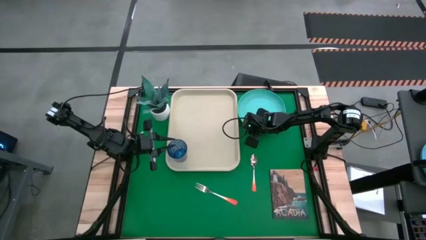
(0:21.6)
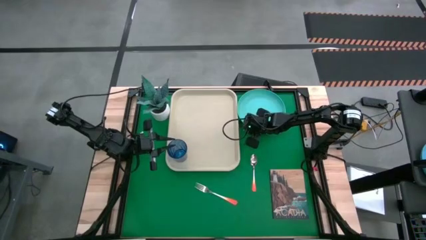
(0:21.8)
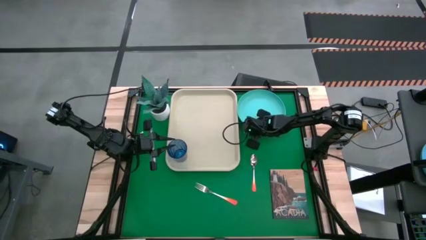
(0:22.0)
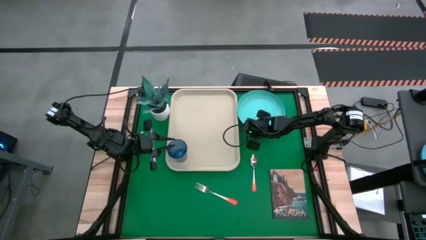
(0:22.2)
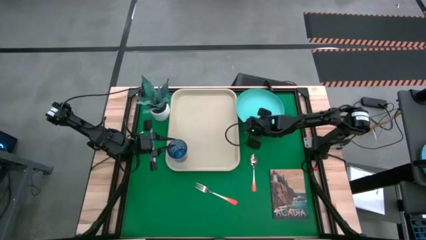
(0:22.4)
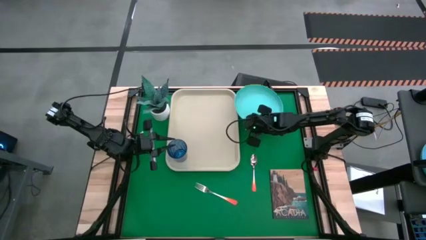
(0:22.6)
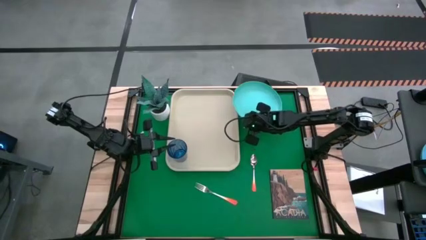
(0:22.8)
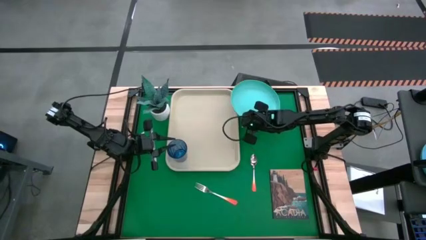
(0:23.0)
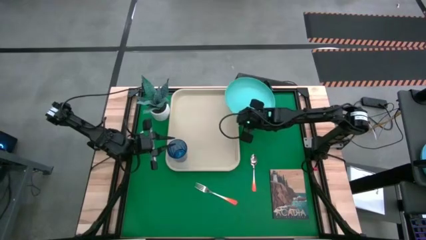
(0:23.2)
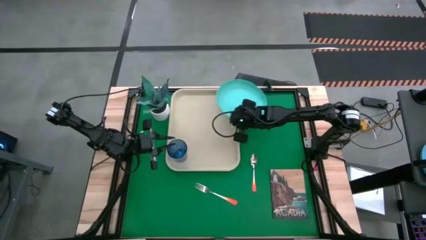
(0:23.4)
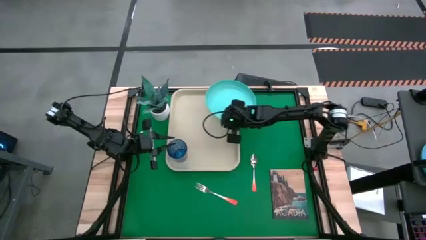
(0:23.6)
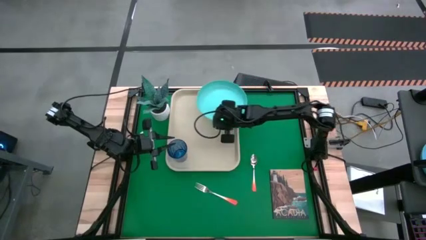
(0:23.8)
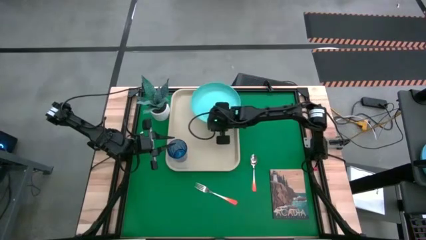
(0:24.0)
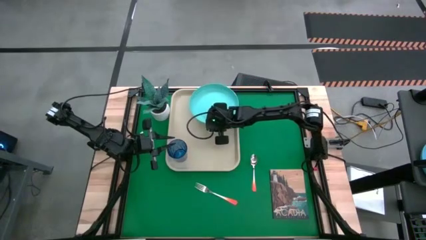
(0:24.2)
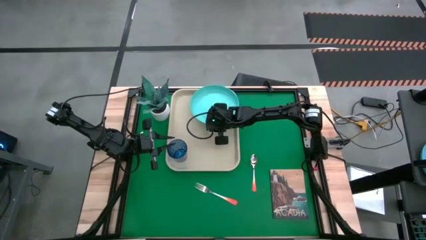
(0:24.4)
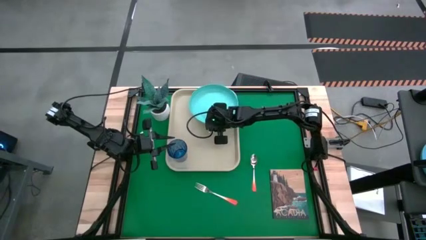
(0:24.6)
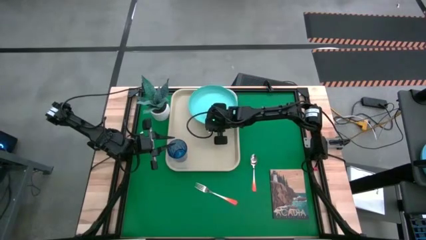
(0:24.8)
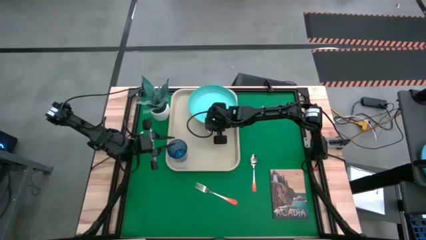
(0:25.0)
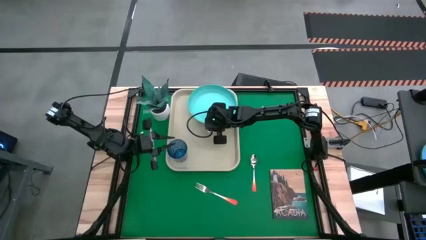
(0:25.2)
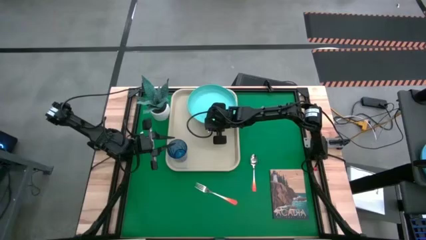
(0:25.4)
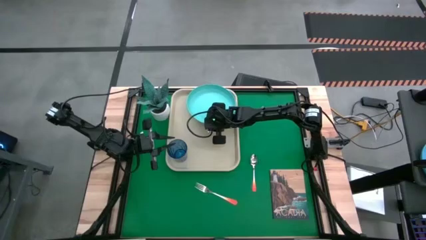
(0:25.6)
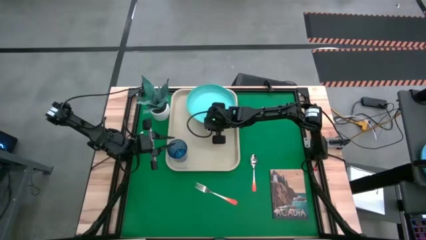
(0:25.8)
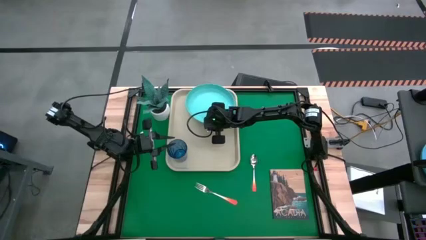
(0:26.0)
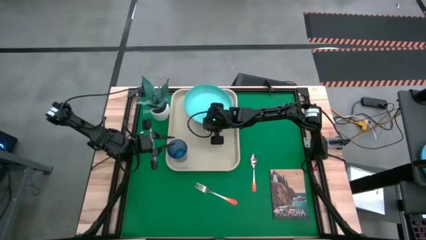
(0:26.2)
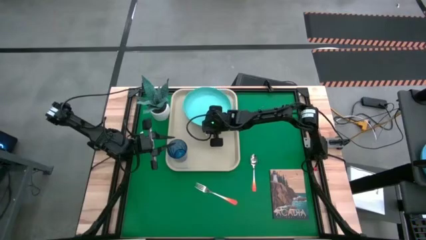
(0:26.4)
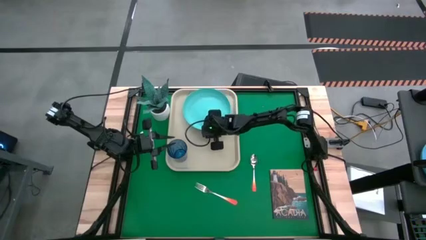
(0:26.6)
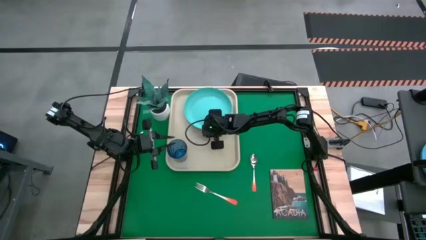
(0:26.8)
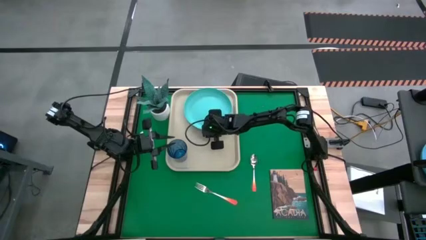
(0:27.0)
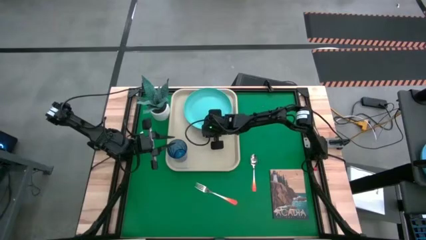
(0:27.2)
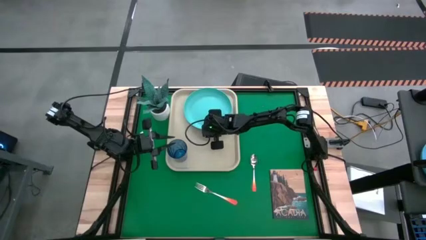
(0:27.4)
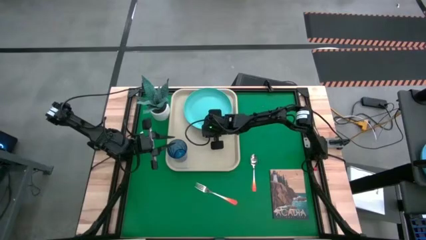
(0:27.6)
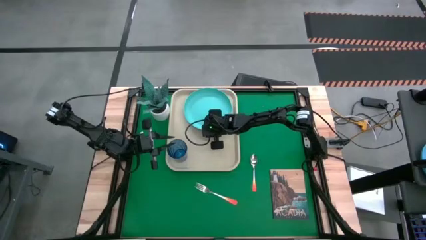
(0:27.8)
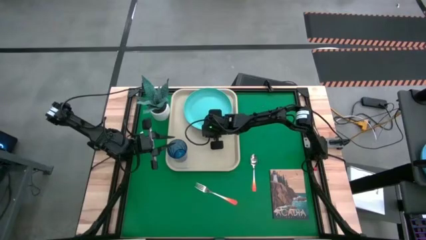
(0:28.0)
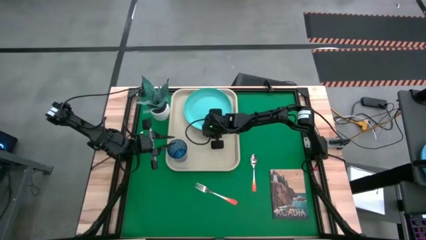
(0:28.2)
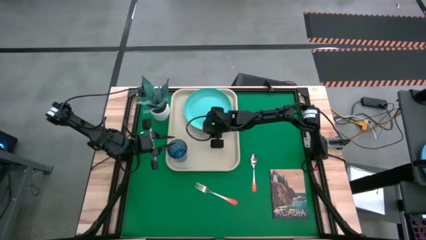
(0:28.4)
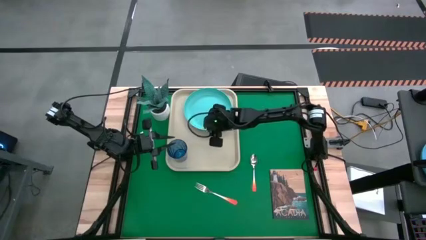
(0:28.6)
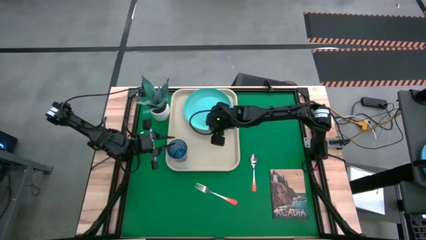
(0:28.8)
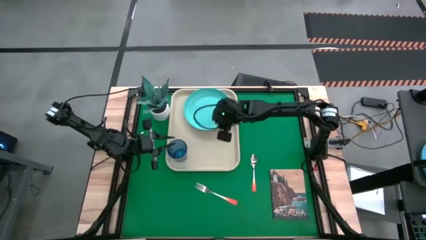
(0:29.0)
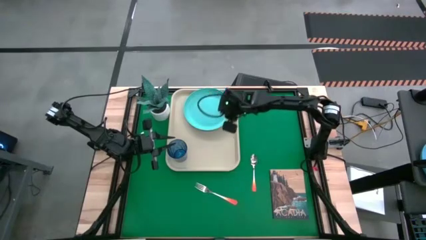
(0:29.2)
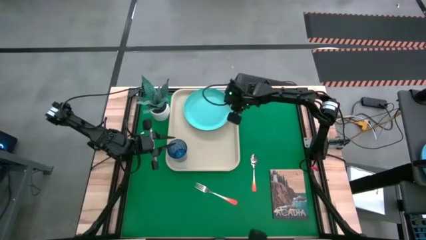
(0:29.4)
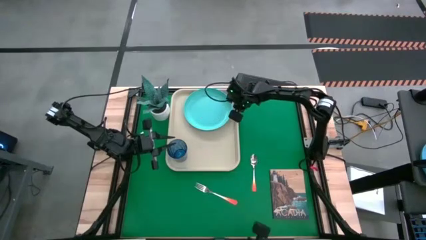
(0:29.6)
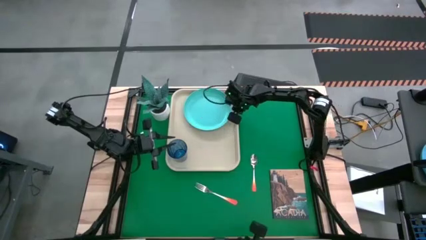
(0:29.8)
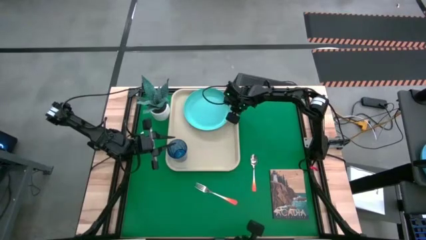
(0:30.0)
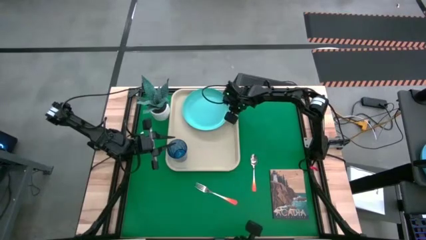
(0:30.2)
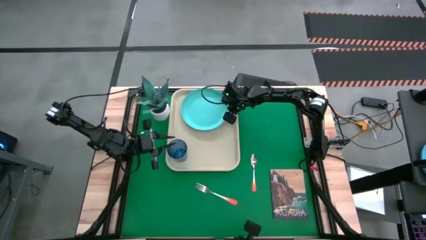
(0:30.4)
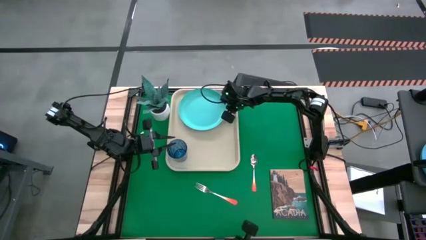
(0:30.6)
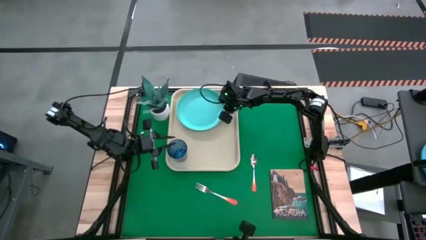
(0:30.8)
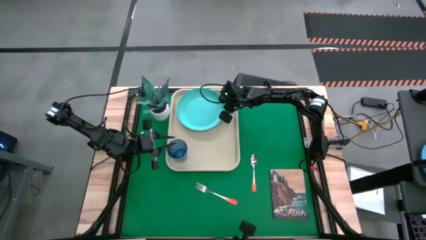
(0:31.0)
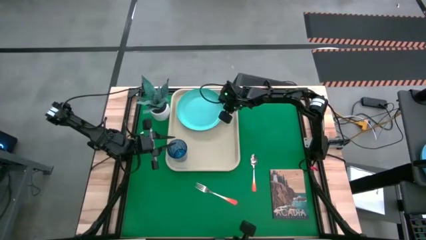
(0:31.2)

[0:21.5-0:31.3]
Task: Pick and place plate/cup/fork/spoon on tray
Put the blue plate on the serving tray to the right of the blue glass

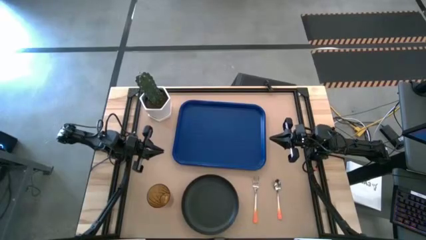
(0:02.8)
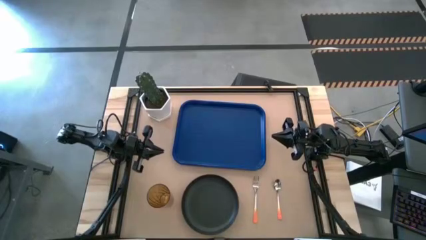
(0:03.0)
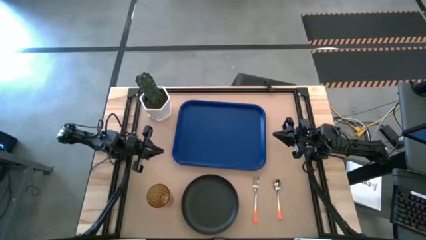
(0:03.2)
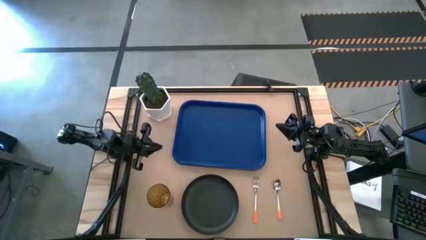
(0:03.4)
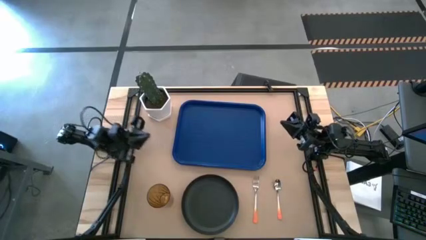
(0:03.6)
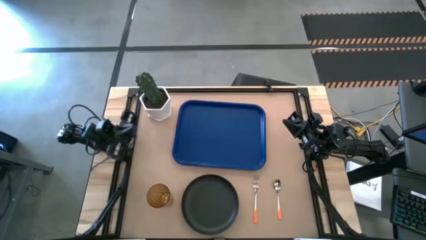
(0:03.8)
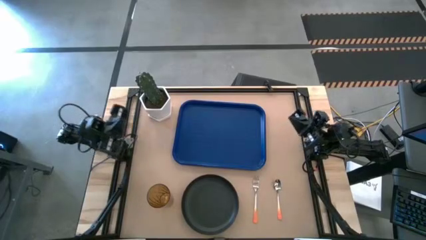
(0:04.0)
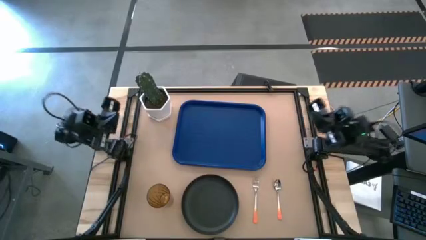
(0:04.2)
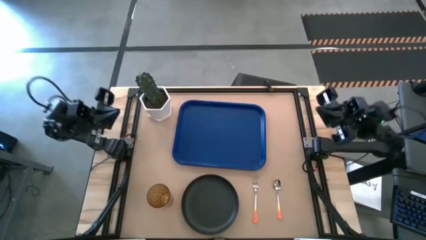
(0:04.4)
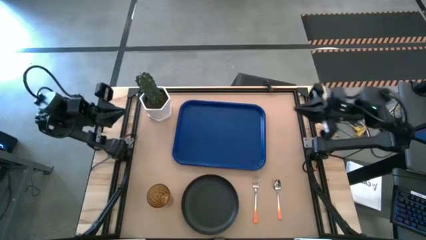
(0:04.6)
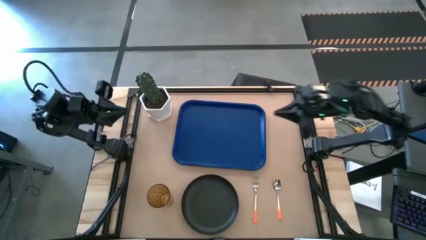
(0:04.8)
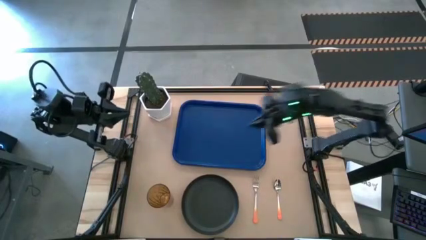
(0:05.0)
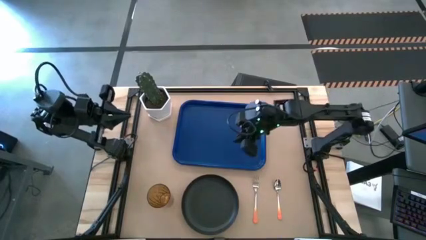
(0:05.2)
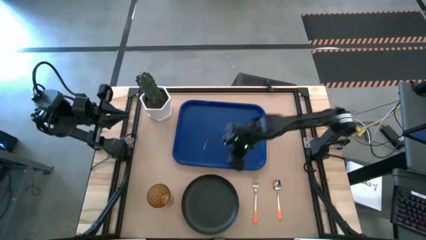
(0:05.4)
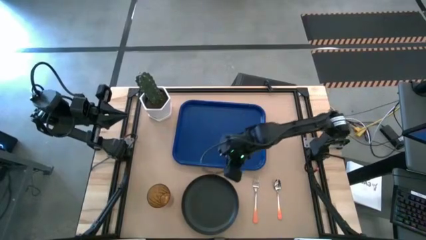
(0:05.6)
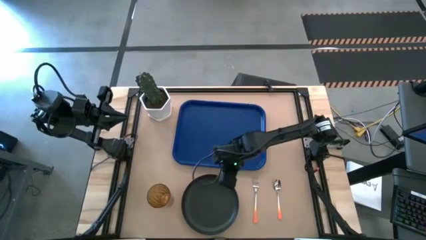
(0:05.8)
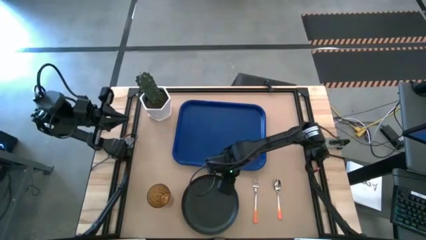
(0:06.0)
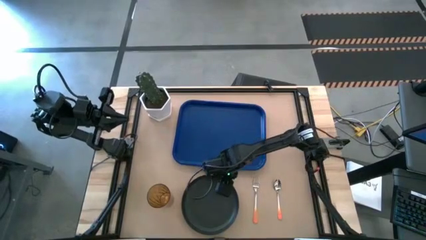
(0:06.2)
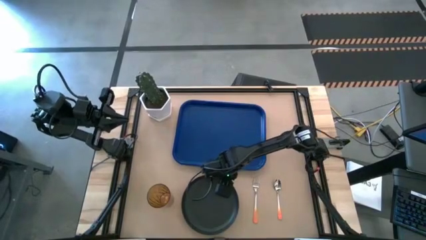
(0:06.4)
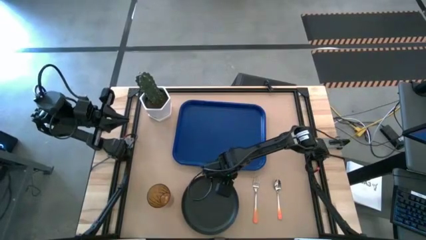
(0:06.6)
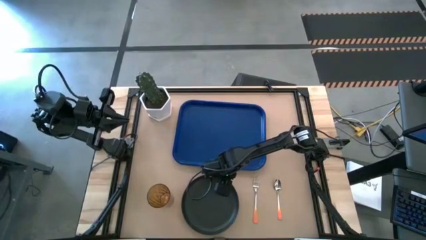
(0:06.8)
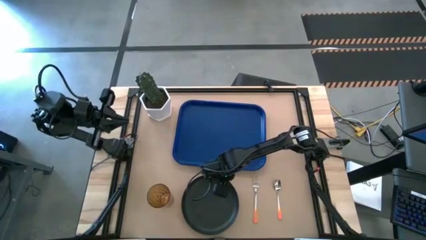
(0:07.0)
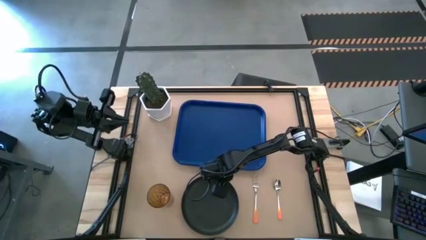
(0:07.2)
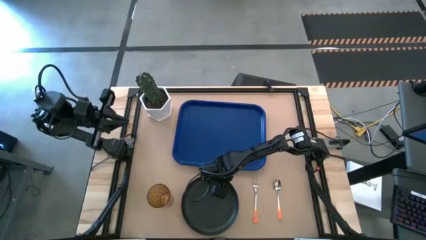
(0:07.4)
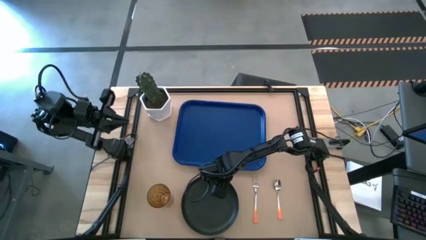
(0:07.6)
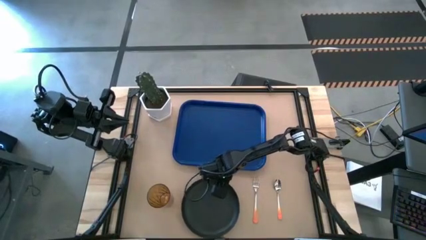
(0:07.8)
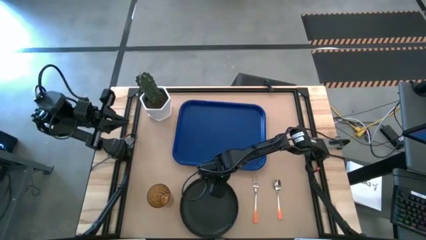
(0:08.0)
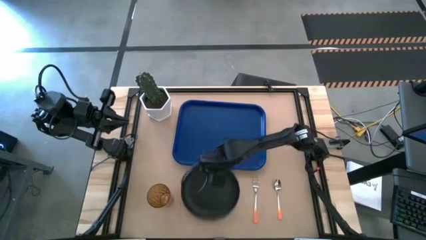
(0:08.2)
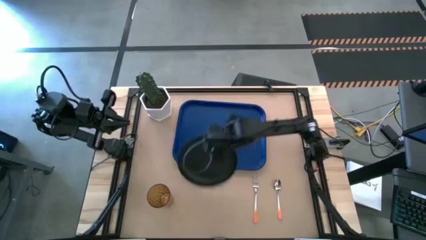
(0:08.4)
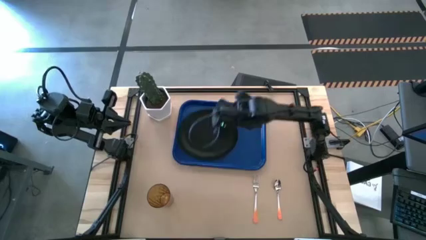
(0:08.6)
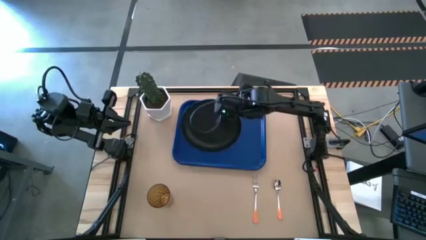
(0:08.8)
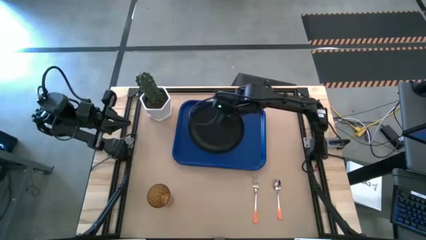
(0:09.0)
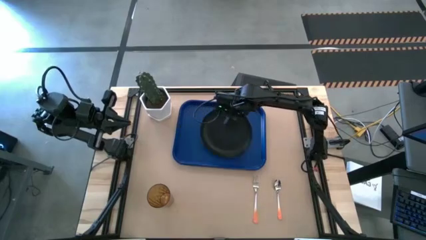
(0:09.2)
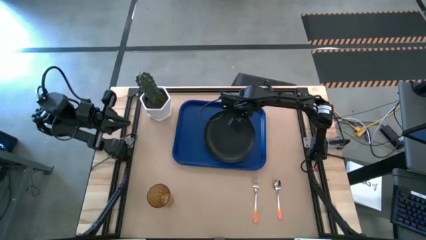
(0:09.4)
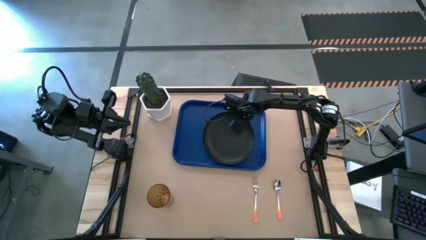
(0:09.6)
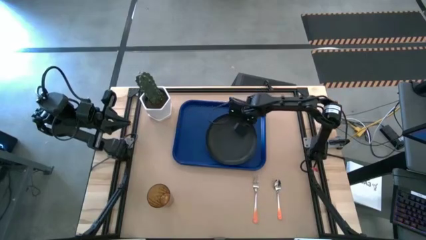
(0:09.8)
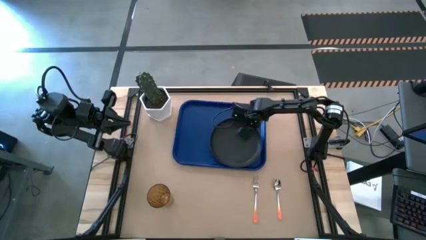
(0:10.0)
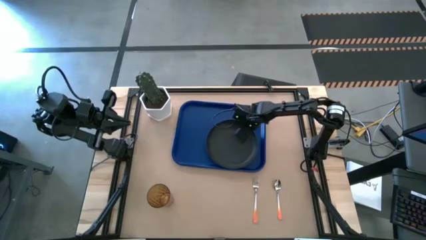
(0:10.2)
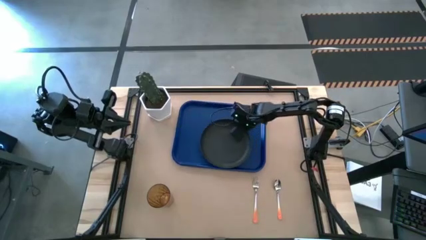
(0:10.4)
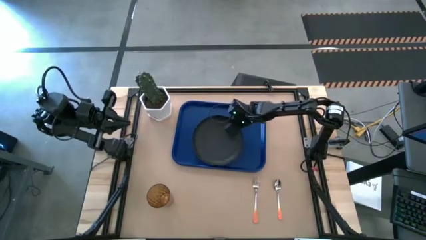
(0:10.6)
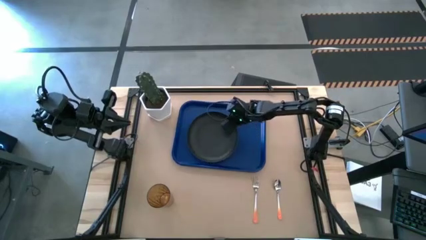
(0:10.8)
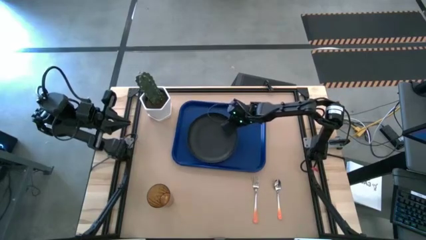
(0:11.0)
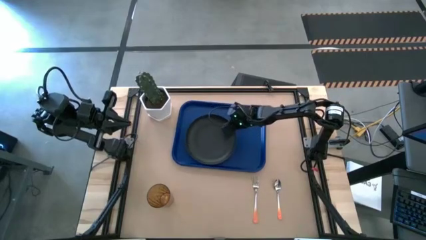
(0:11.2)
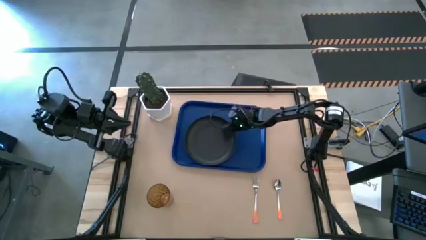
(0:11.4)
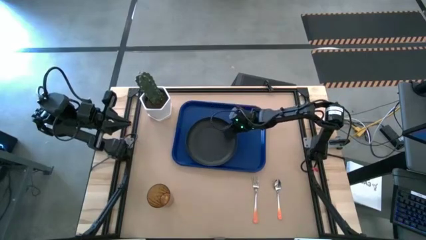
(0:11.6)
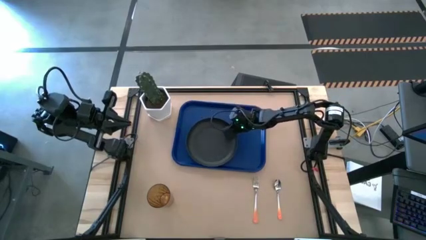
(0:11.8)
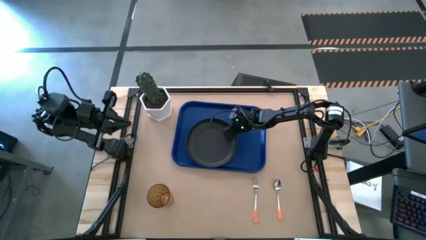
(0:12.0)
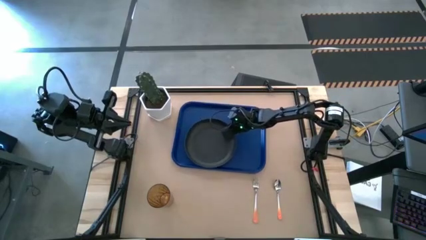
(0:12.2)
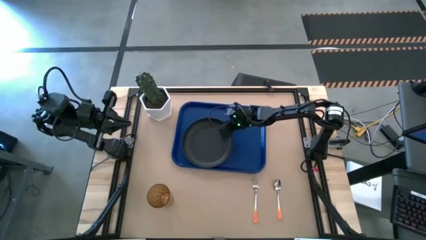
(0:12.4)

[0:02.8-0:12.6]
Task: Pick and place plate/cup/fork/spoon on tray
Put the black plate on the left of the blue tray
